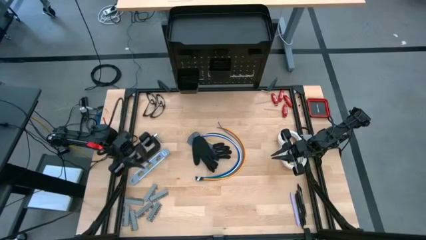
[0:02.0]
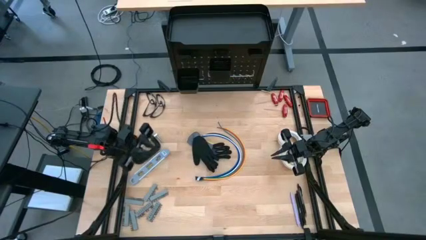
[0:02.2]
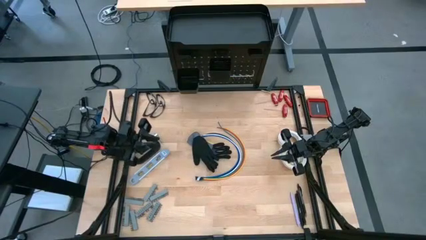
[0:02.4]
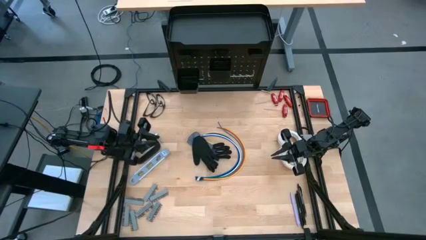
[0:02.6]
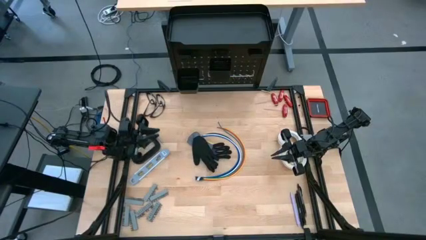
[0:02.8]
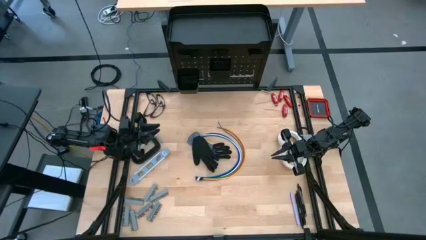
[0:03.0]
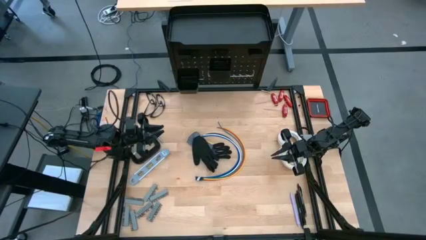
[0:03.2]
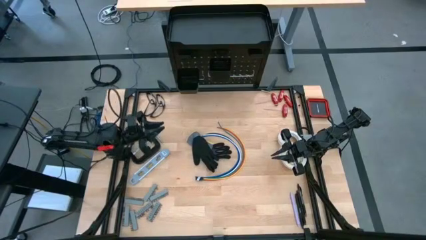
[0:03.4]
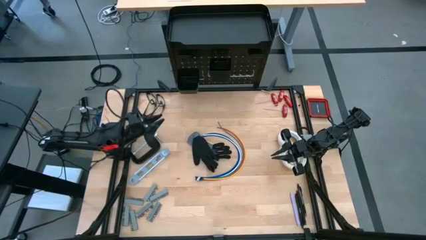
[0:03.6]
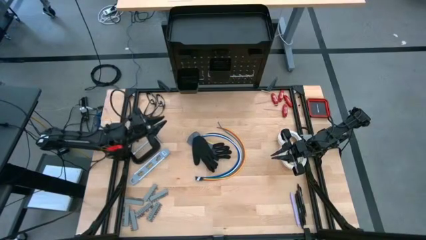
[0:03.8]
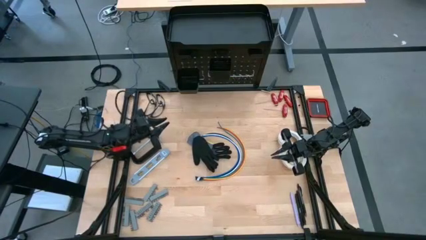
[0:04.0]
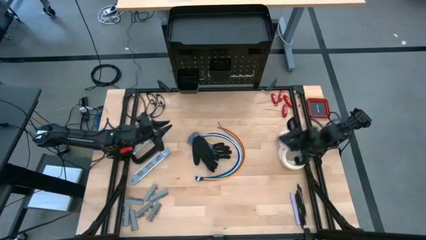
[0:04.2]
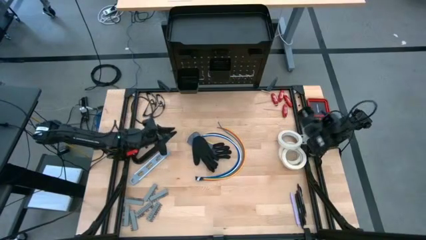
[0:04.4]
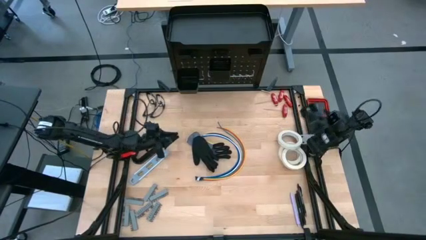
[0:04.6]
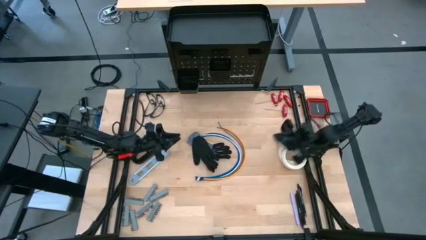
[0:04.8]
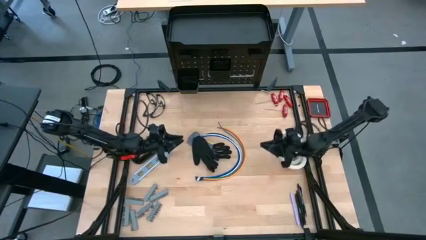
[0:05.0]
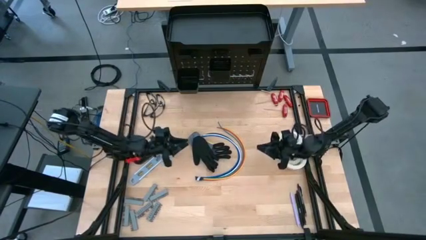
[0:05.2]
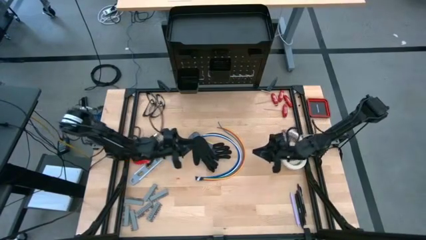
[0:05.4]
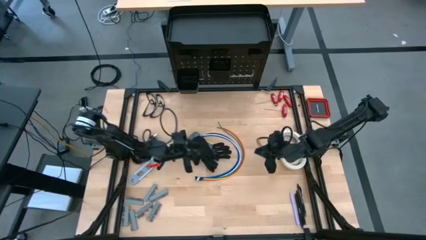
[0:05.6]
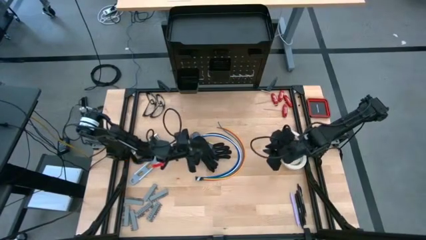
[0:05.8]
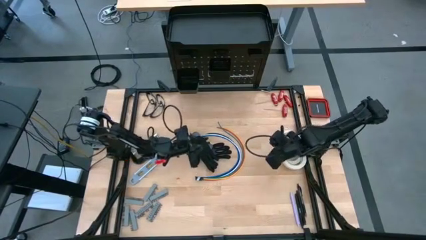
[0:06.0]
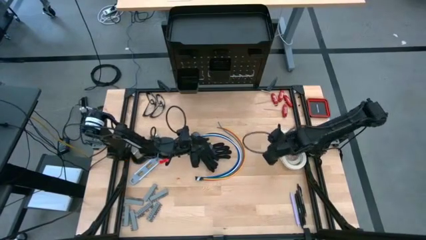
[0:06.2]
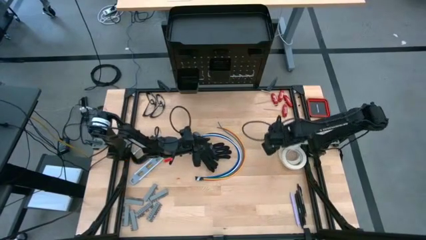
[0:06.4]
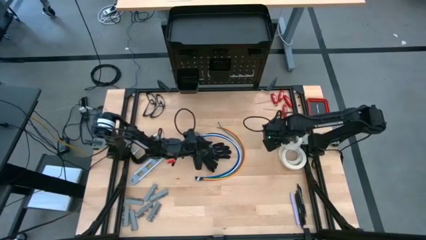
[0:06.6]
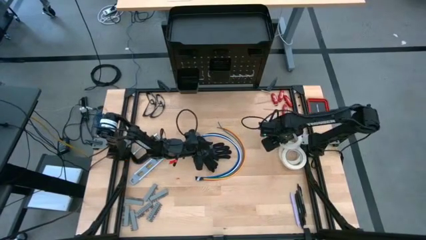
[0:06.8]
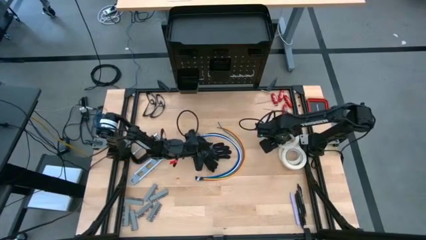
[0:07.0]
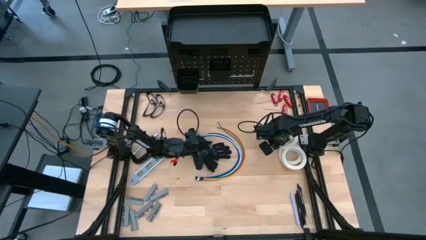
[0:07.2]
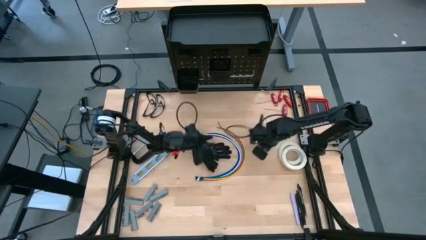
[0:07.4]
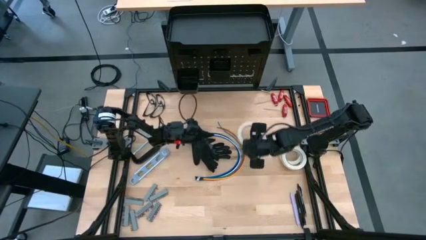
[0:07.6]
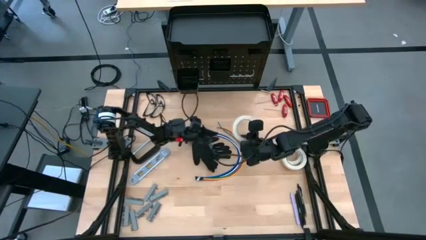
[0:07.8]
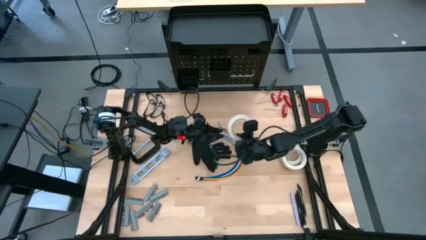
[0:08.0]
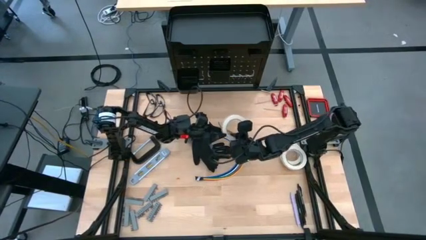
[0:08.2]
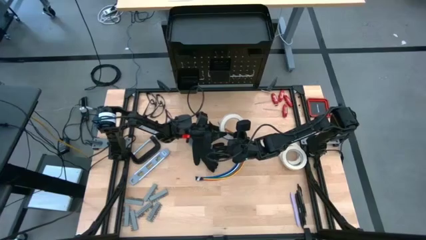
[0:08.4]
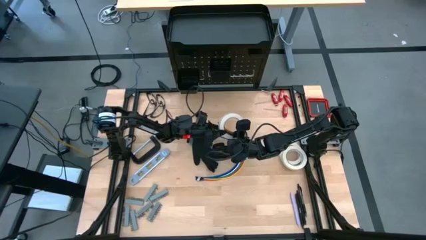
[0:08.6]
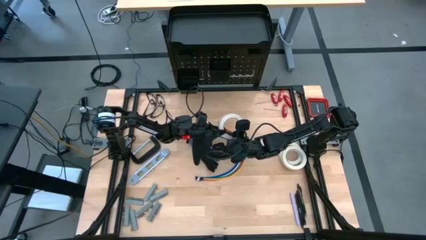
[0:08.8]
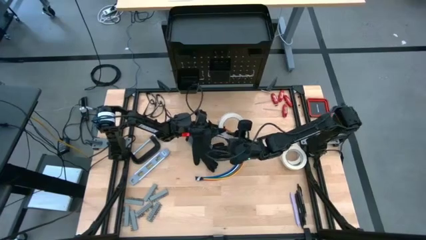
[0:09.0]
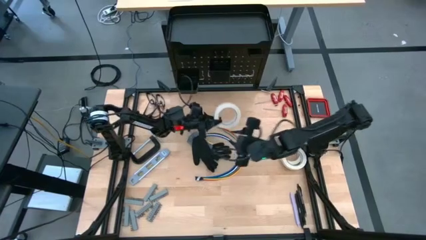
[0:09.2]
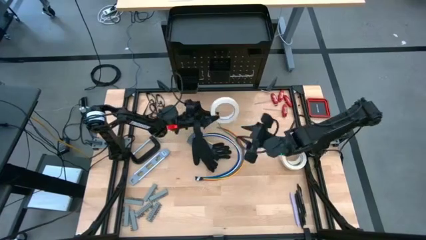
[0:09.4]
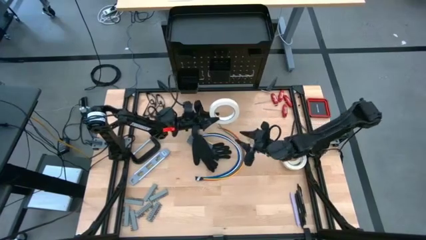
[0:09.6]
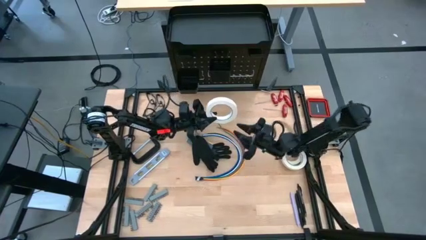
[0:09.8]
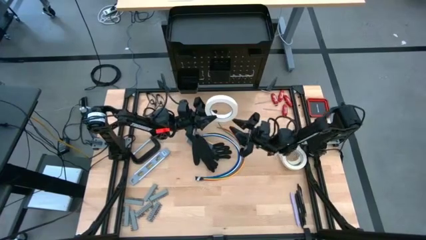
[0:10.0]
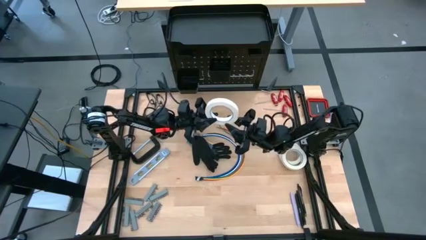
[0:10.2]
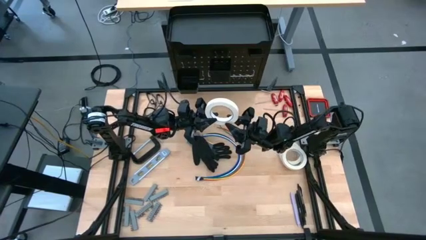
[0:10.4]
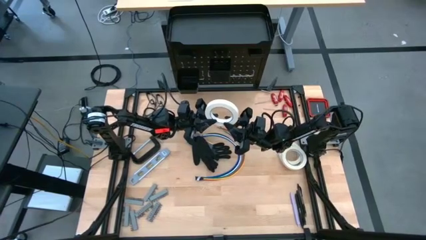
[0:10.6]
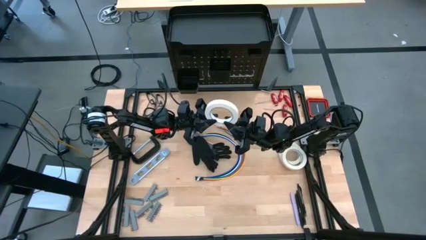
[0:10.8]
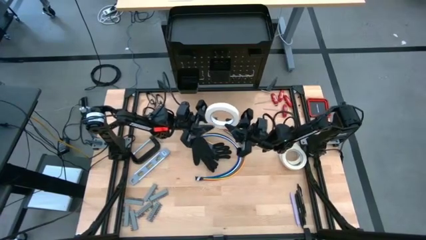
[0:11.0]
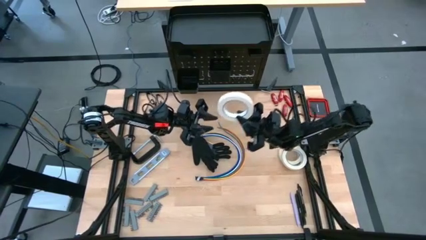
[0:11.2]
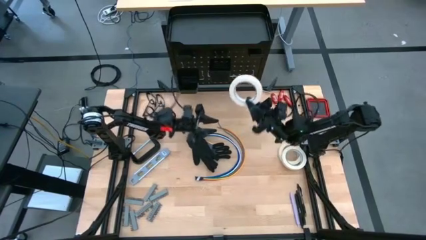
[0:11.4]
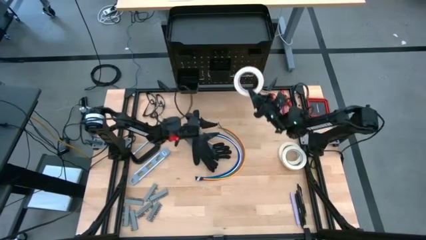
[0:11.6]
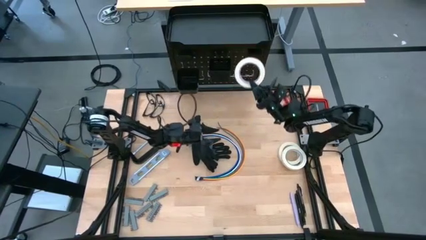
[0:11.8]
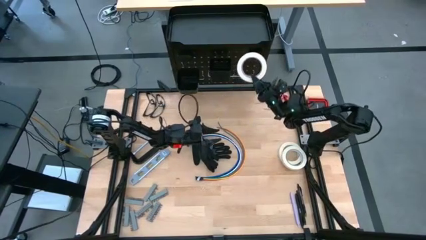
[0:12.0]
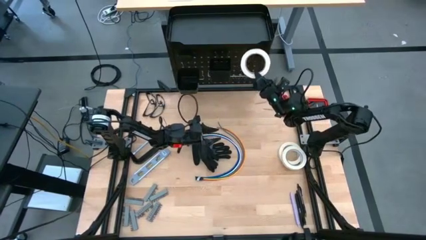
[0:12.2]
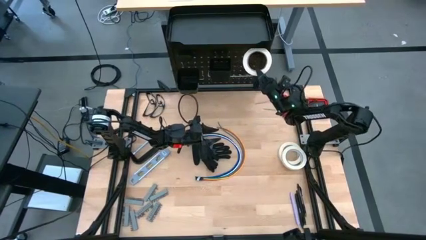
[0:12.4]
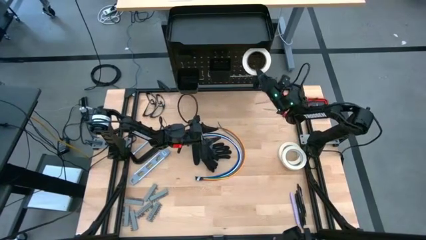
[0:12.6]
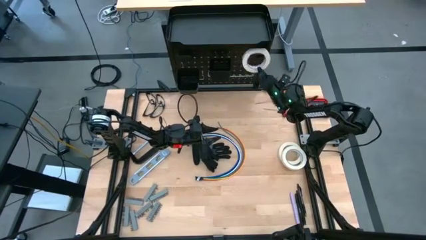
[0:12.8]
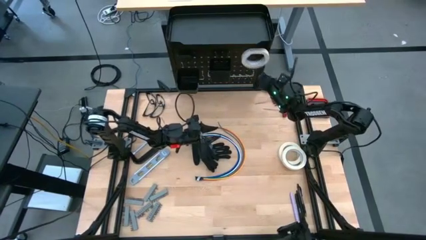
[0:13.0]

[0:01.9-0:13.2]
Task: Hang tools onto peg board
Hang the white masking tape on the peg board

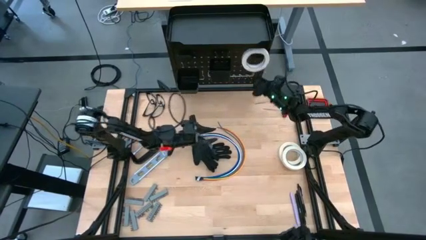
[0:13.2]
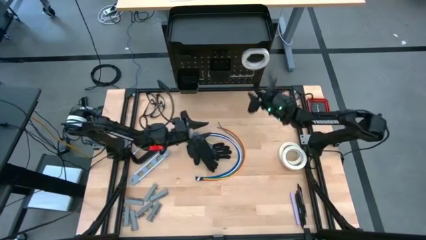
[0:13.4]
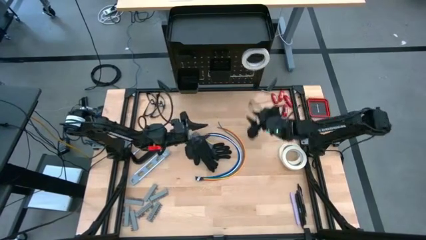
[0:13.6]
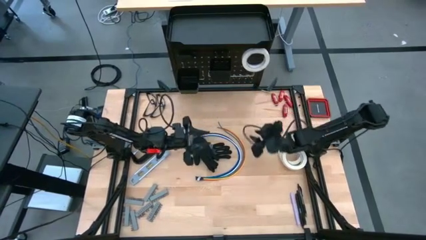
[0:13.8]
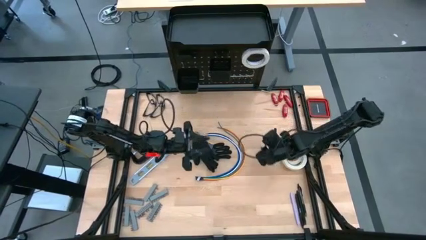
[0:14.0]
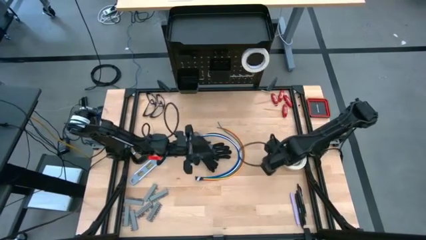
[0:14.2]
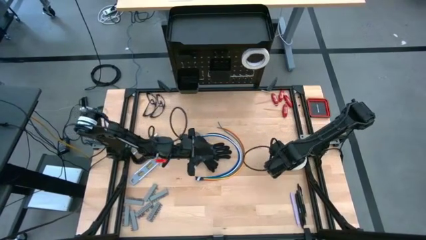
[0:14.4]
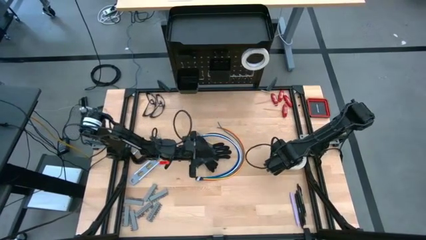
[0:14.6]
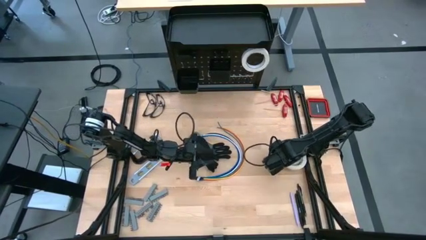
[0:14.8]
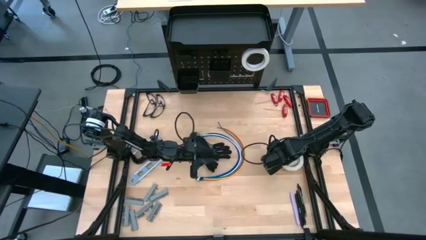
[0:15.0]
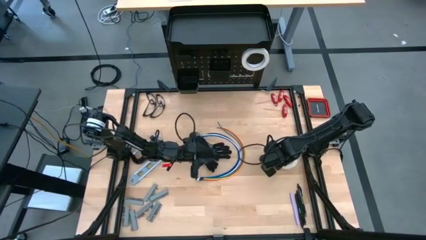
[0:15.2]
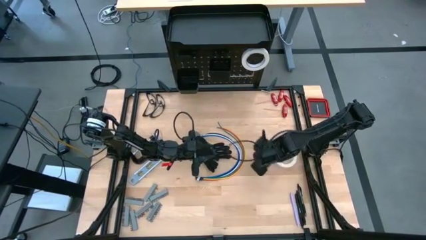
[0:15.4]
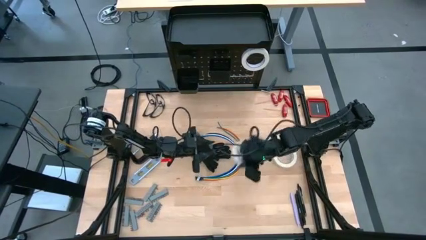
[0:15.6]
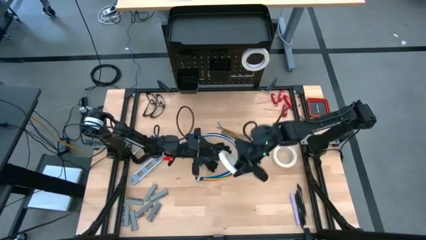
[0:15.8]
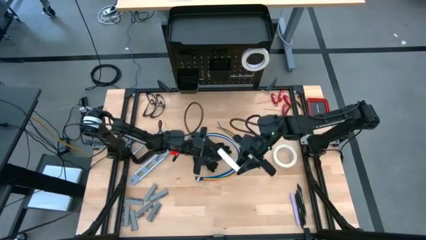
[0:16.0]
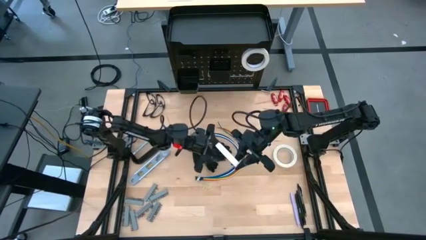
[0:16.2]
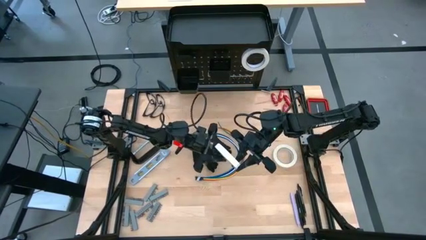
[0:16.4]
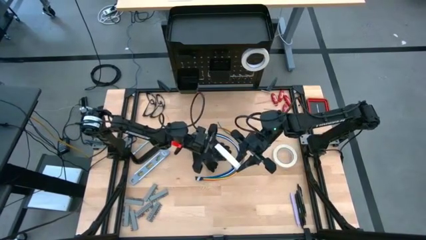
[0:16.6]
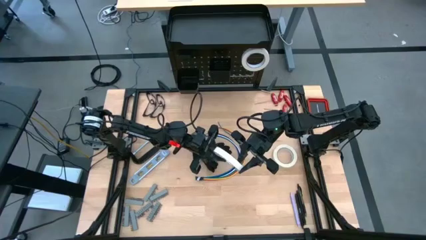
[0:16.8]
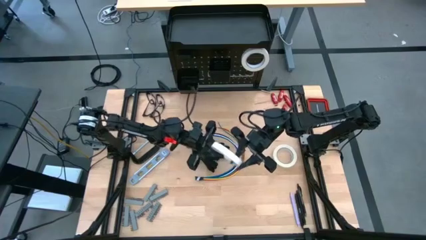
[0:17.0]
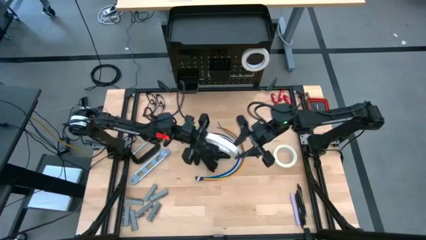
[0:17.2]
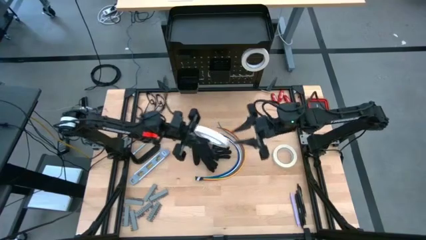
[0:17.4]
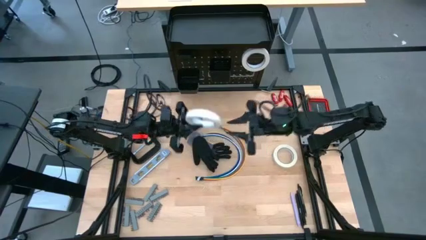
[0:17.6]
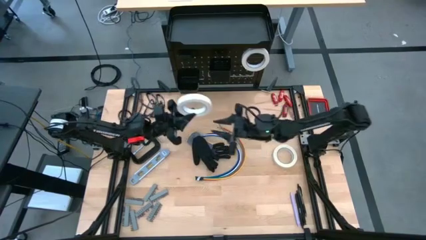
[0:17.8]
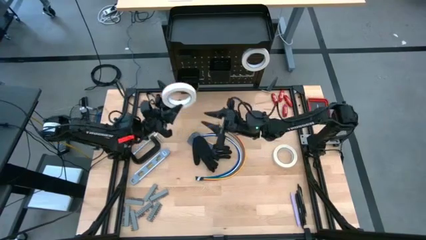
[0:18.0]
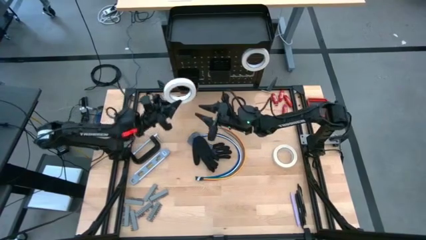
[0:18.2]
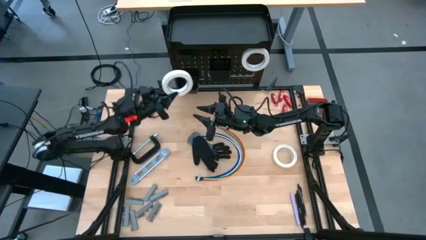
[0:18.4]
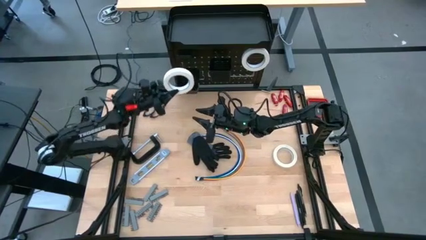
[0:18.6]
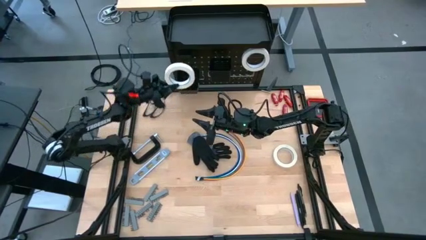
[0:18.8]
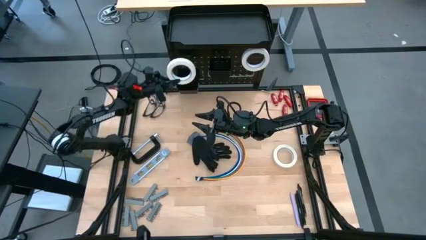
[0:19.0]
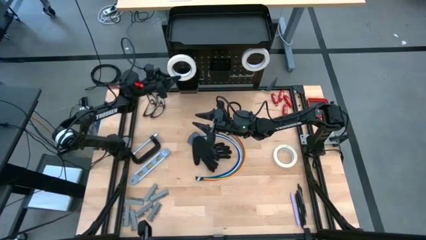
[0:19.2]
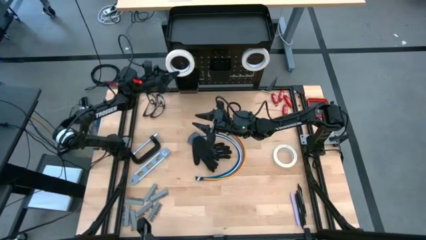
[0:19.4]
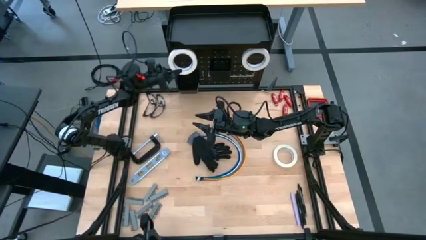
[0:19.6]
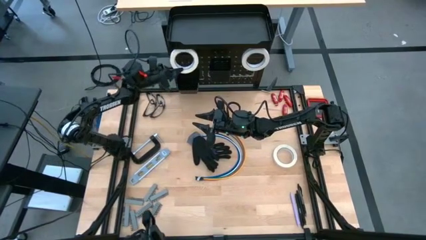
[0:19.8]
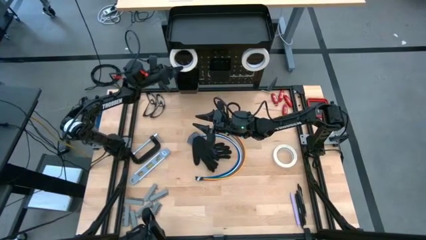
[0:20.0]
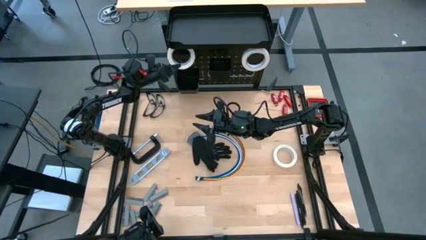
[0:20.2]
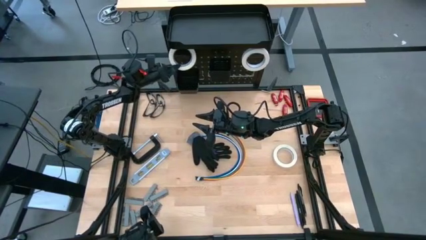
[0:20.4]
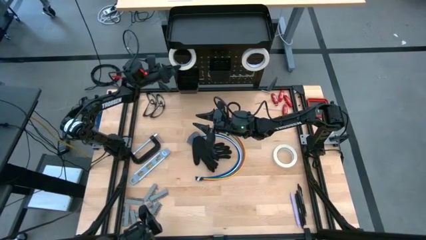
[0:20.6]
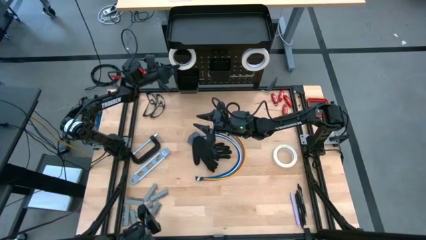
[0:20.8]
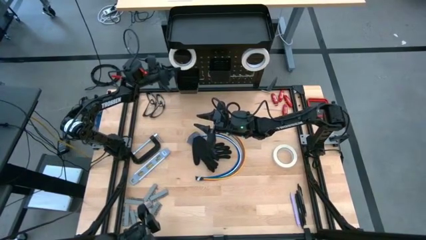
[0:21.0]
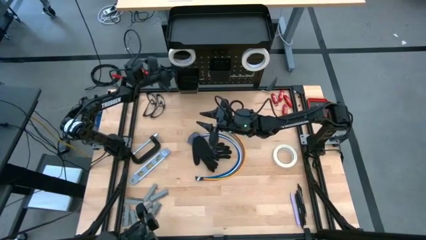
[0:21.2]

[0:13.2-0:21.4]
Hang the white masking tape on the peg board
